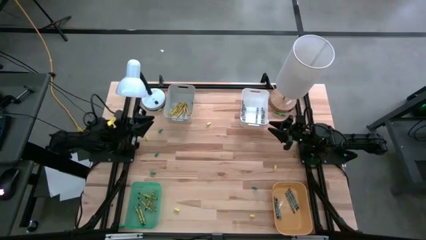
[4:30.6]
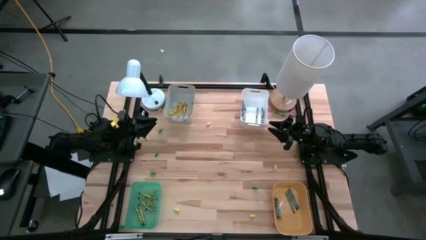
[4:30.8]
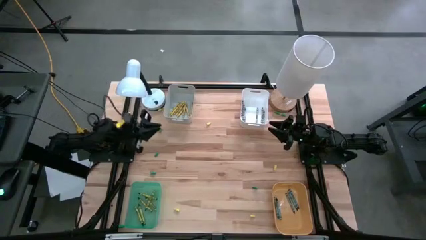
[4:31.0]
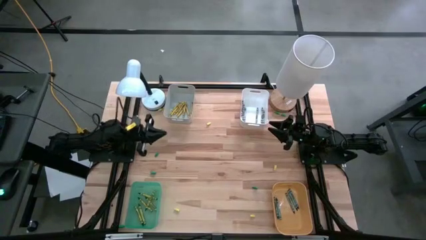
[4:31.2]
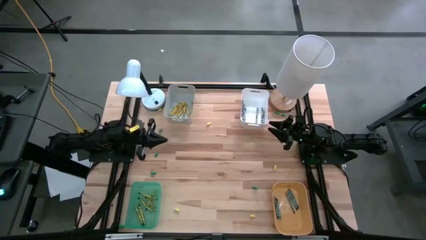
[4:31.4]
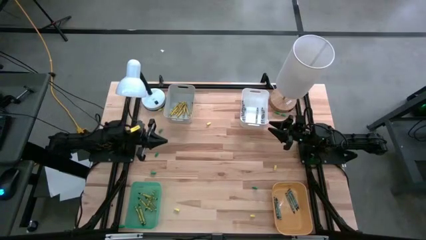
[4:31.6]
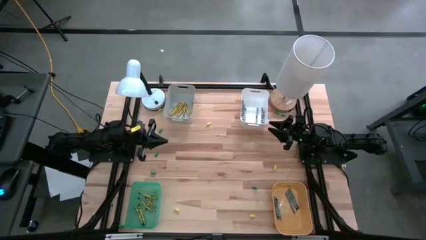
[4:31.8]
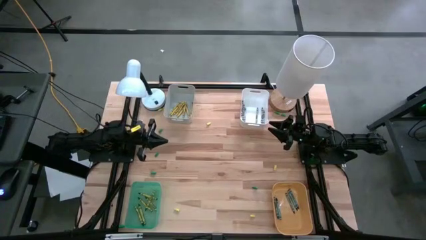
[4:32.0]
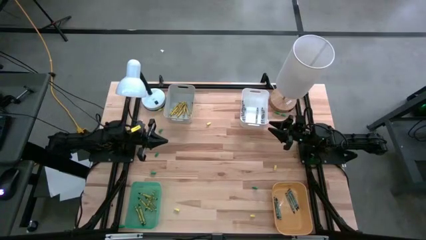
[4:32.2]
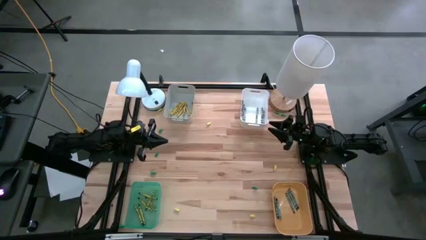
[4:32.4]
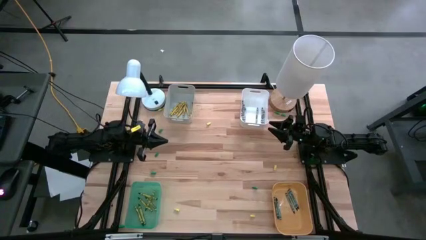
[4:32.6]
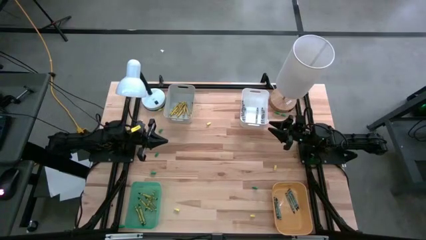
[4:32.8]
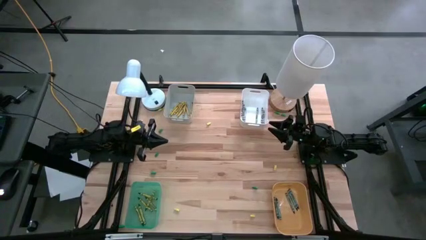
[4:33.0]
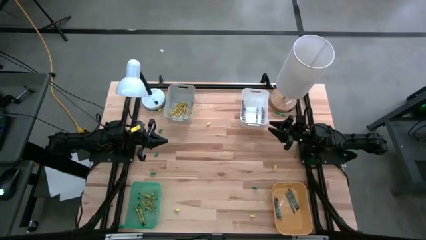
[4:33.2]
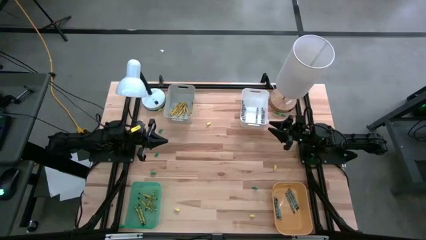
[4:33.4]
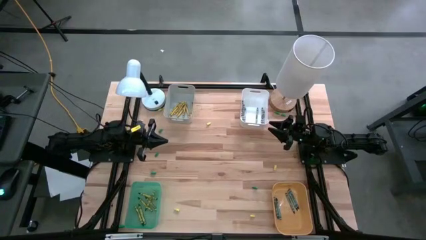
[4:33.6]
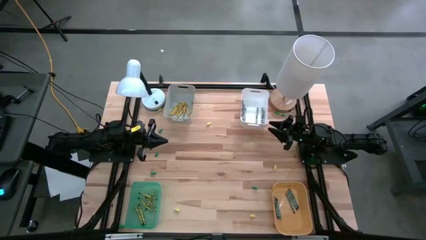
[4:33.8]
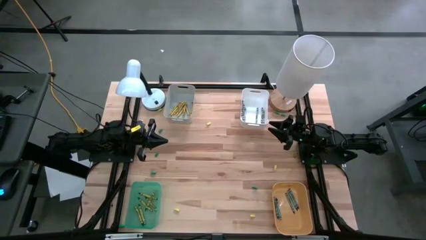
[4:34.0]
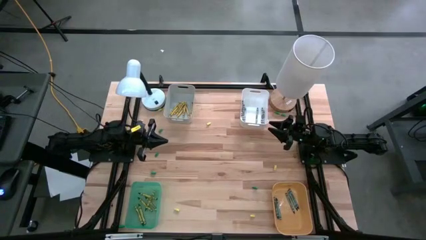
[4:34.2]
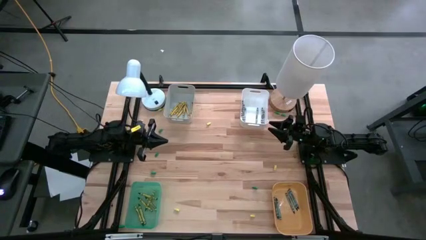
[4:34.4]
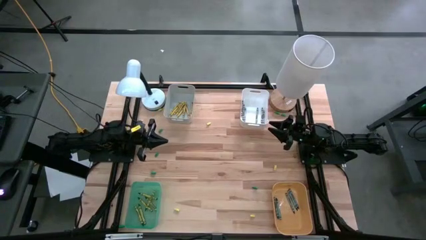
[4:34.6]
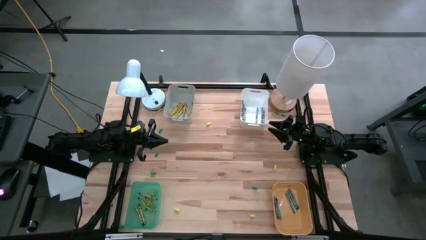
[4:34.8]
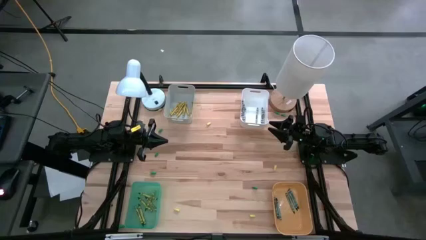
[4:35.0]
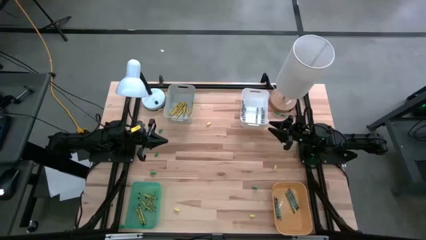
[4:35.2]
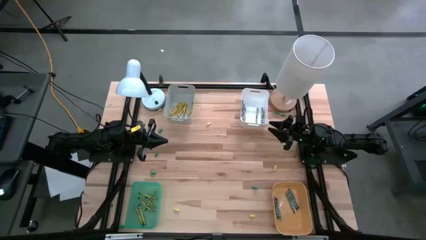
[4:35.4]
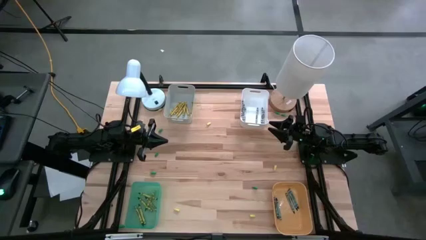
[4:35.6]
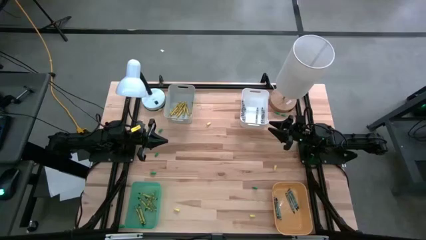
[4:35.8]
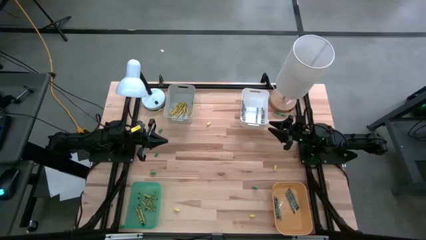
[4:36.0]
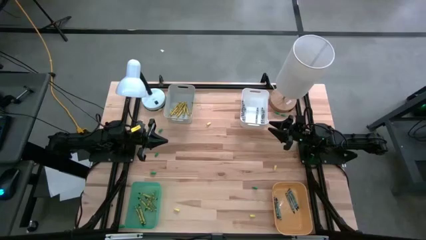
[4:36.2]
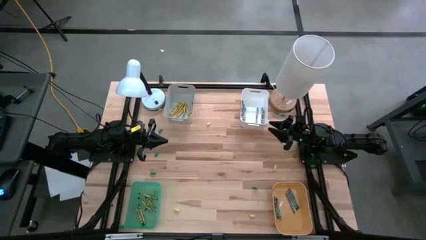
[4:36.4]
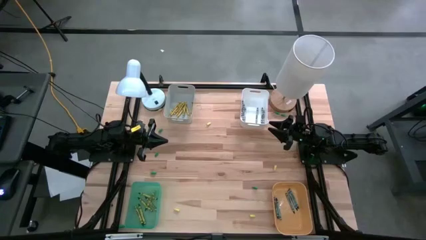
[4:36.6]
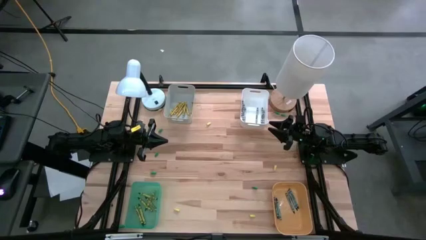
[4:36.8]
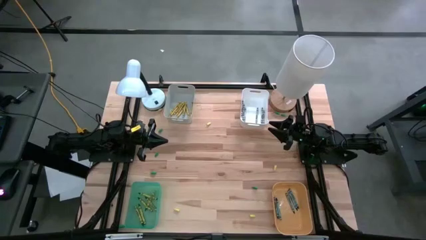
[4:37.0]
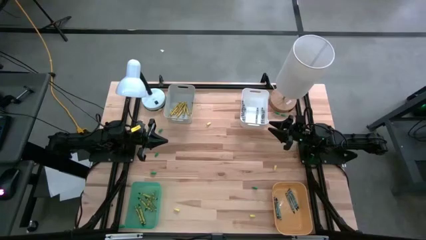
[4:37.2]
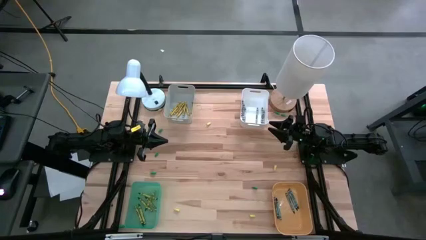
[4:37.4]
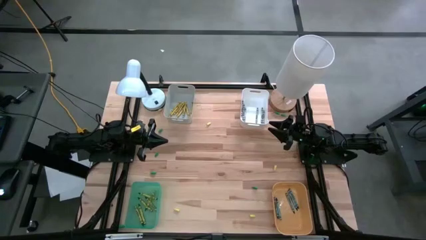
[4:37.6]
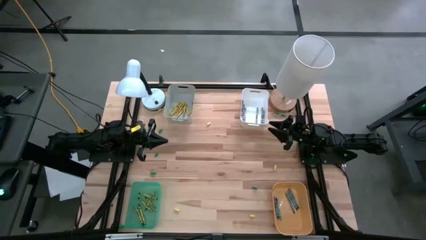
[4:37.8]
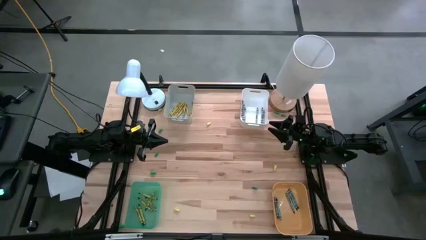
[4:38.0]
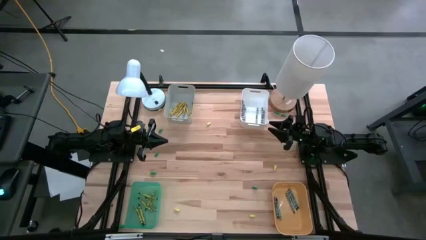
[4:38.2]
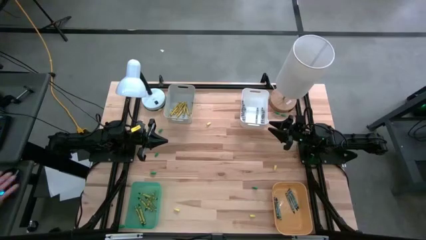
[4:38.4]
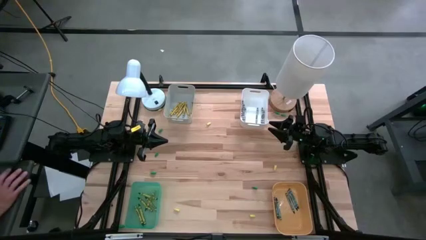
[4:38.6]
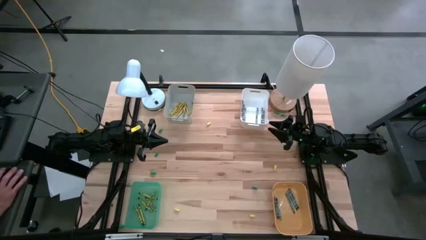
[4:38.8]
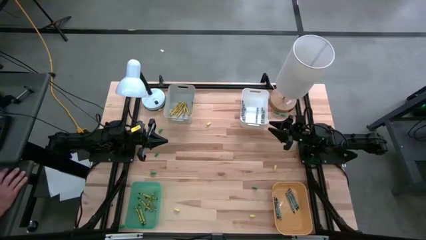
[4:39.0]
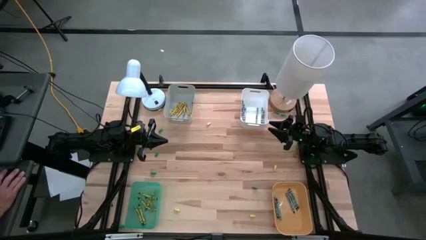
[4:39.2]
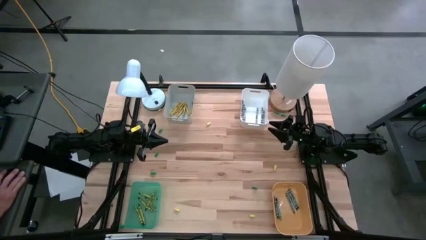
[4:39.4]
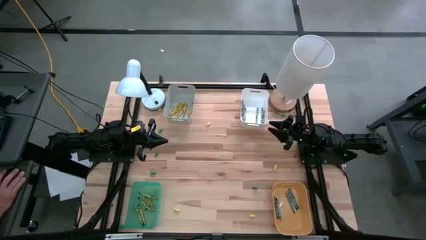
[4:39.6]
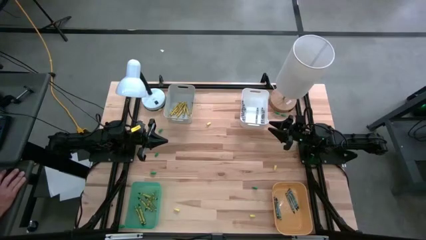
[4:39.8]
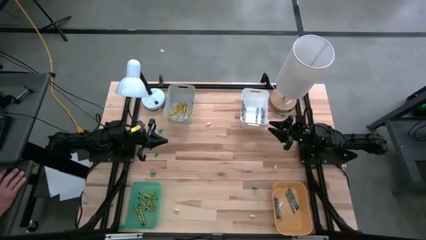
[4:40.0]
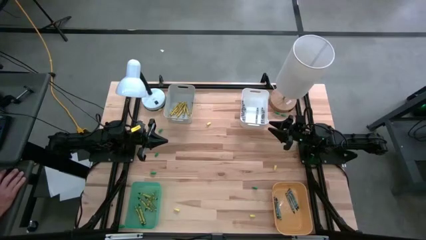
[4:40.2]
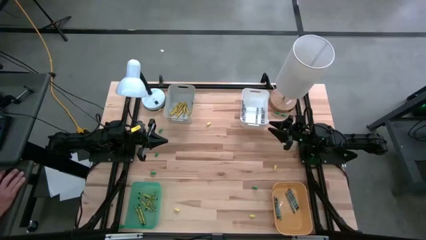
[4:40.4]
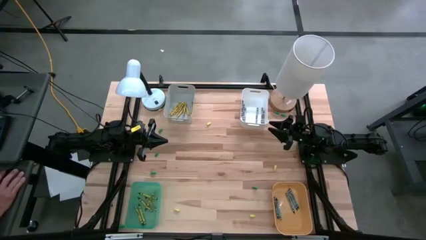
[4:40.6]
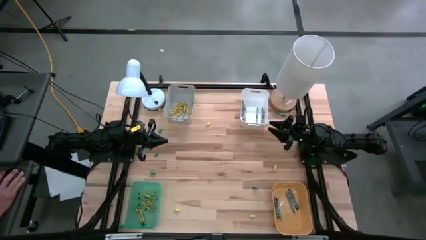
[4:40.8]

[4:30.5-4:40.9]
Task: Sort crayons
Return to Home Position
